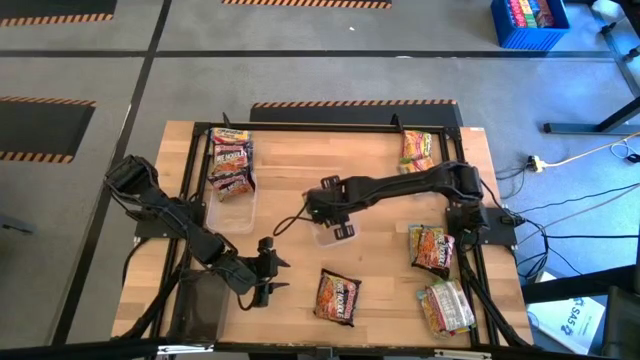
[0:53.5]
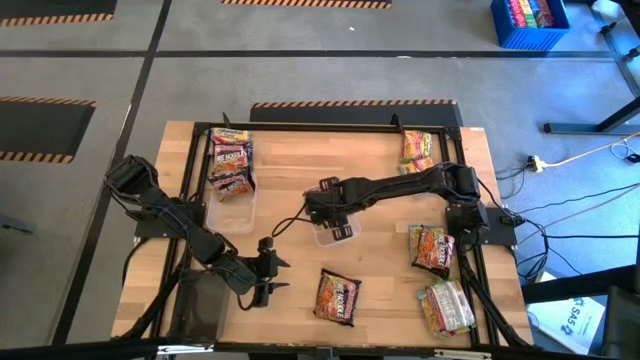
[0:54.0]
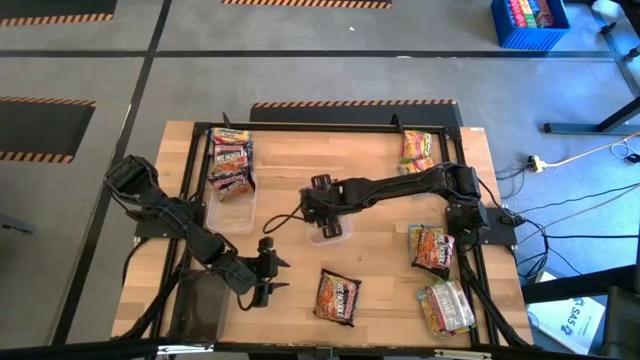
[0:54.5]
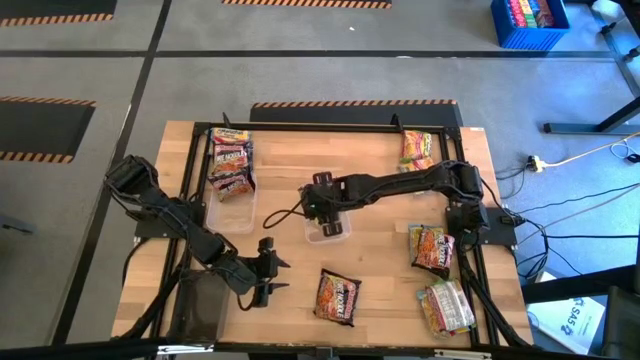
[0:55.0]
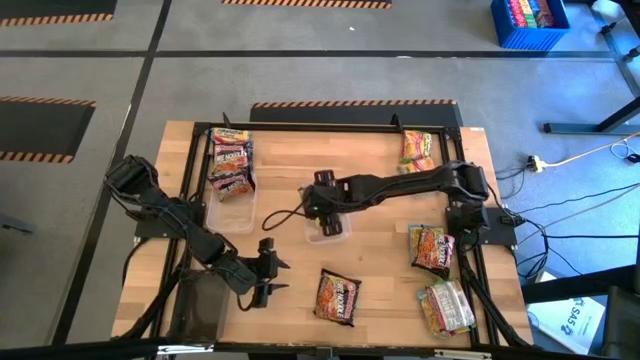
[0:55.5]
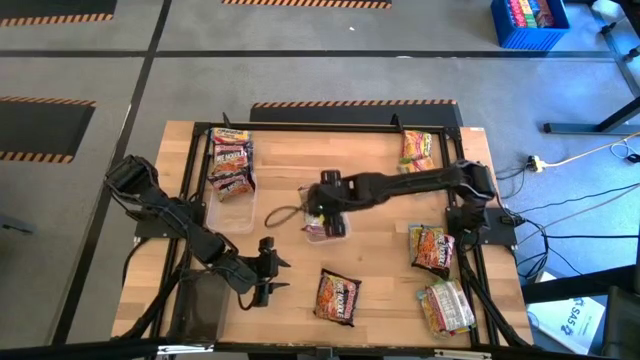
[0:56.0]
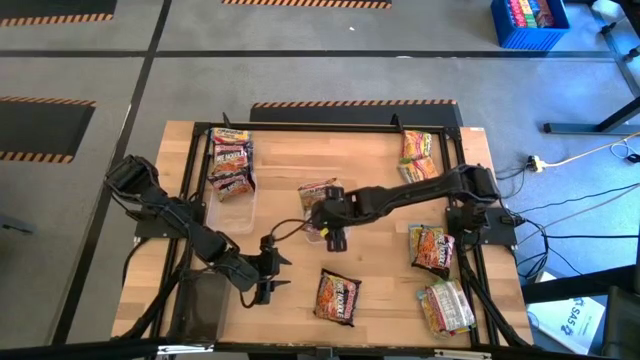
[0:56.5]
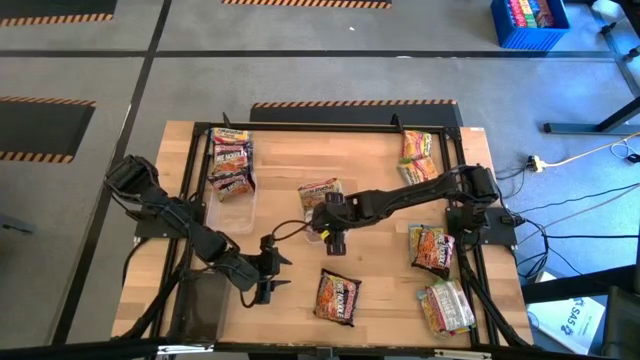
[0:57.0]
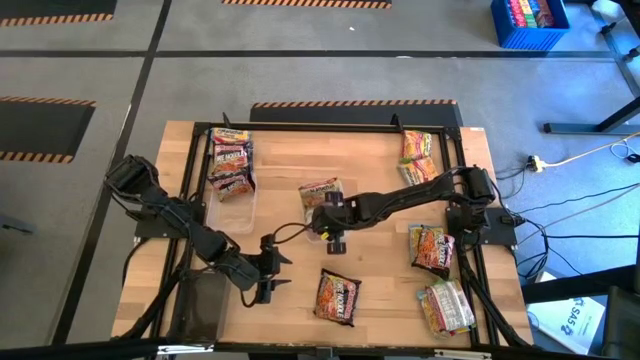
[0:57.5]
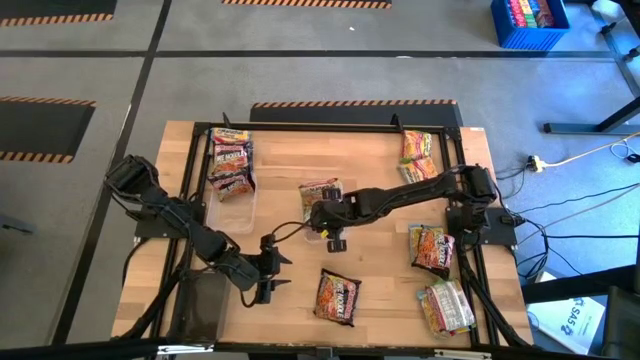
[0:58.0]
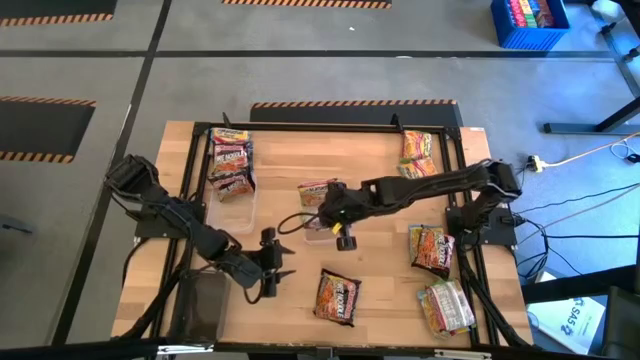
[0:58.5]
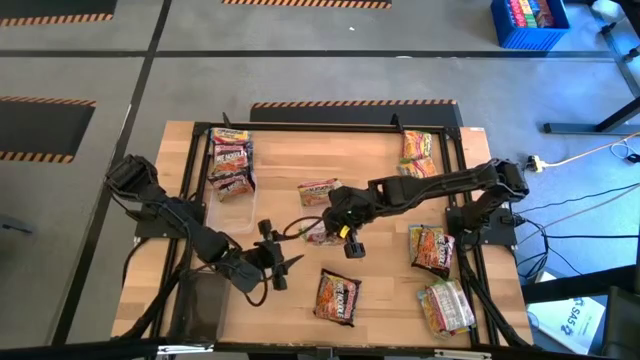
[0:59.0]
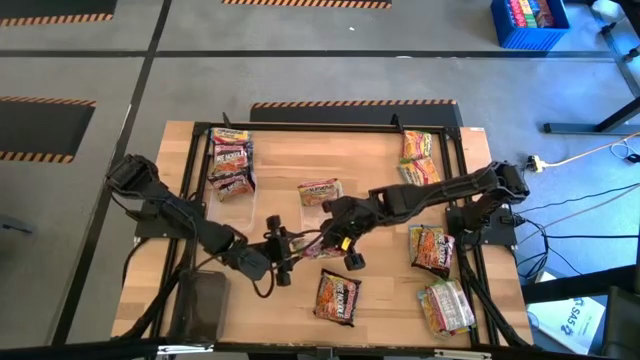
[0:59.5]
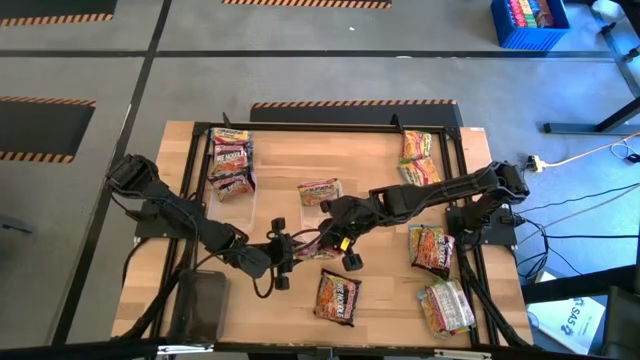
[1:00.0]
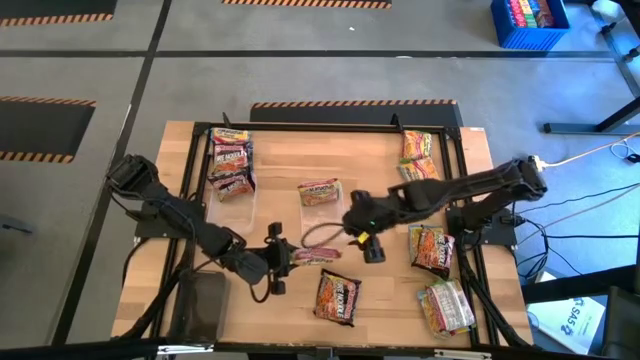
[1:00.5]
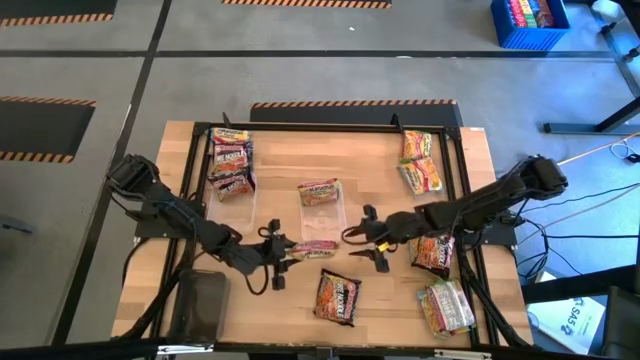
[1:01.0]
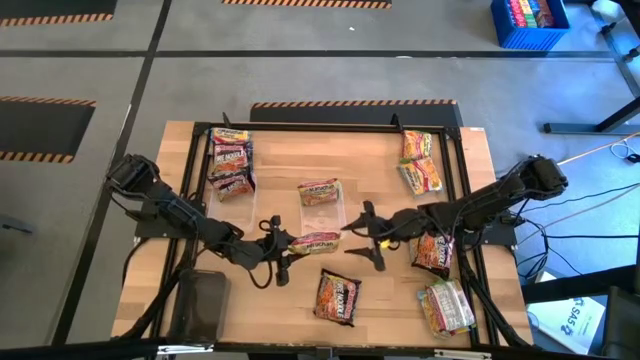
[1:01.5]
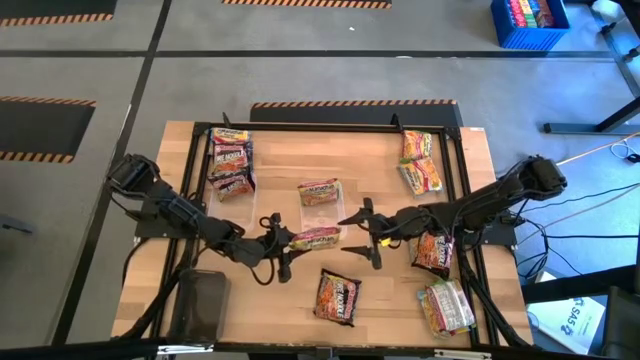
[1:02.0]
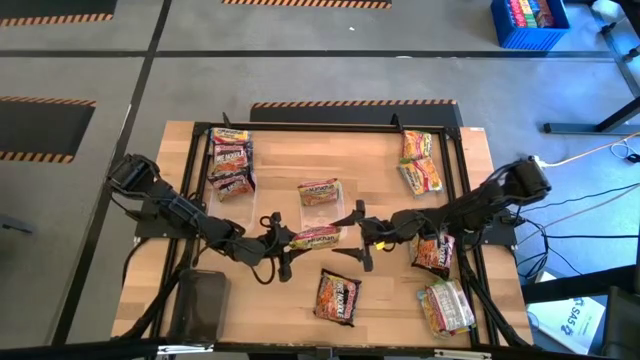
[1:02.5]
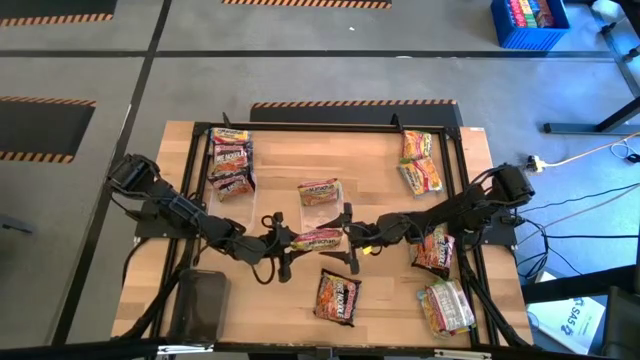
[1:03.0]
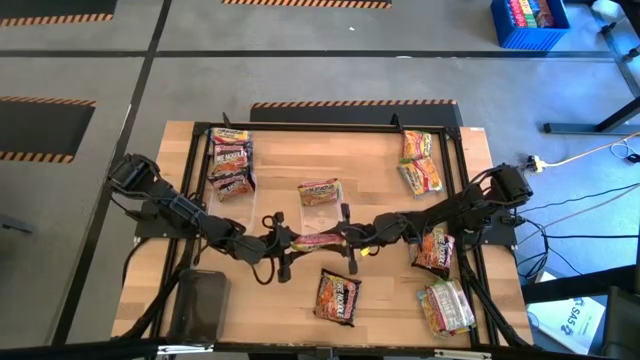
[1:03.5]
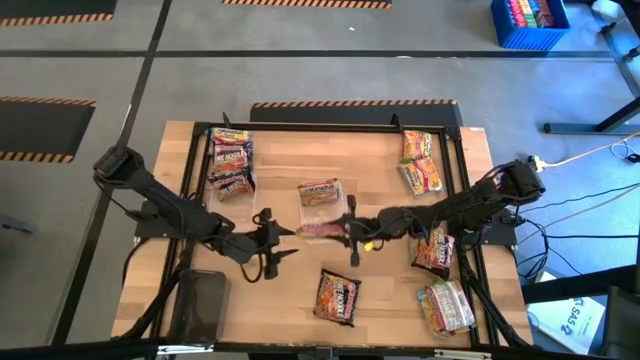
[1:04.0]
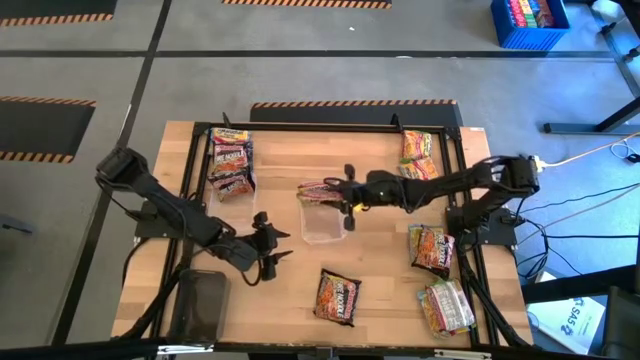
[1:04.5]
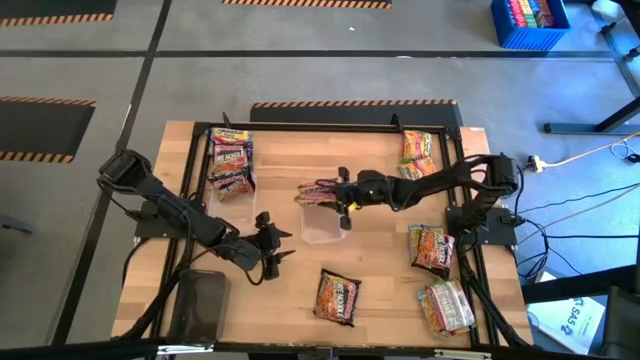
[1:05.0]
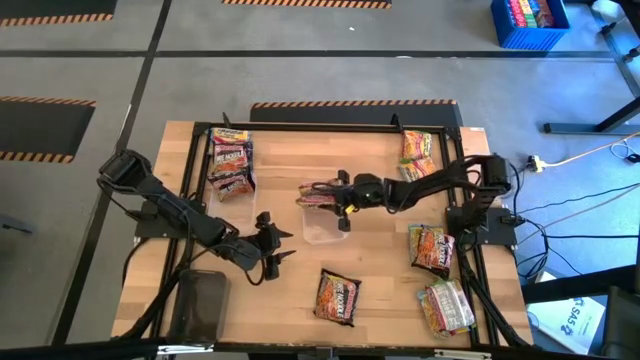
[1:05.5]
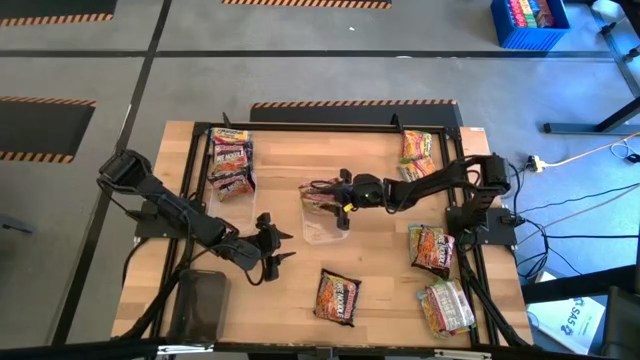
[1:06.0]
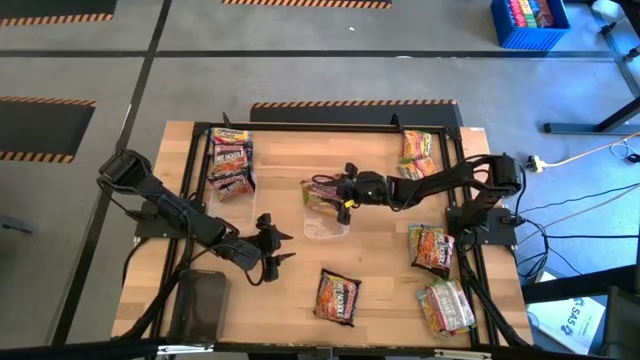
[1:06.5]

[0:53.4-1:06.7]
Task: Sort Maruchan noodles
Put the green noodle pack into the right transparent bin

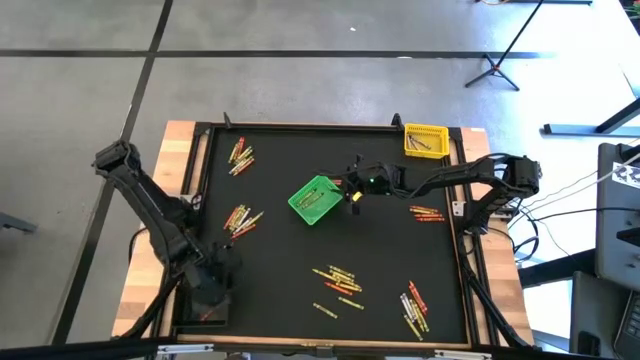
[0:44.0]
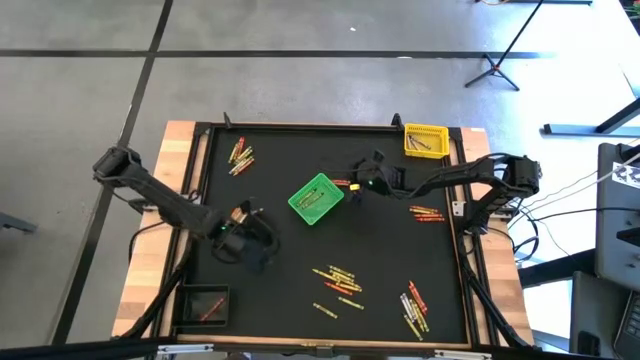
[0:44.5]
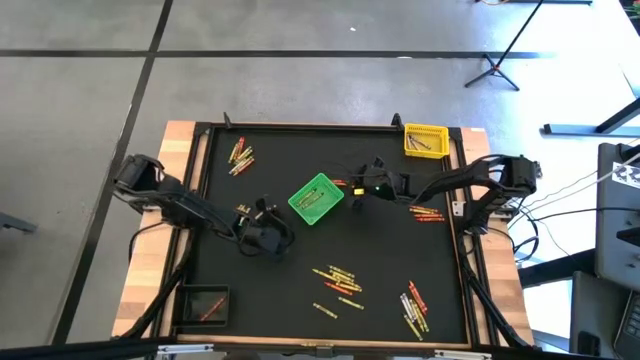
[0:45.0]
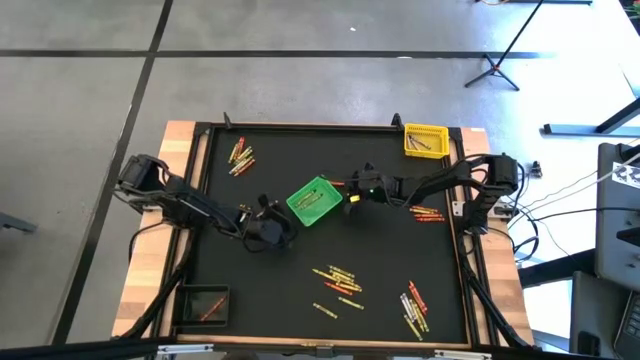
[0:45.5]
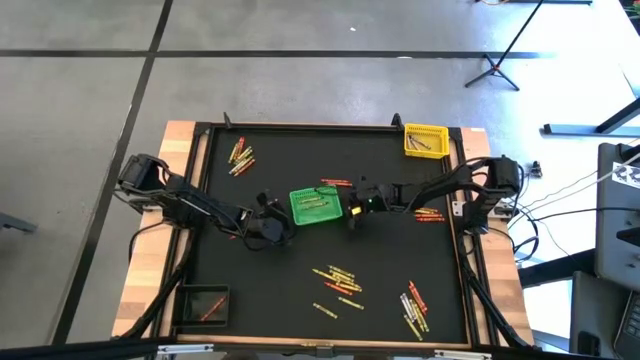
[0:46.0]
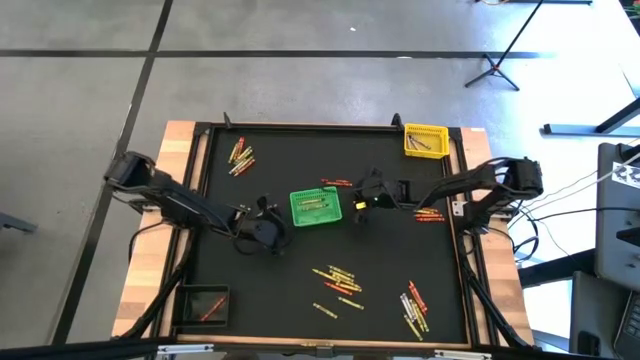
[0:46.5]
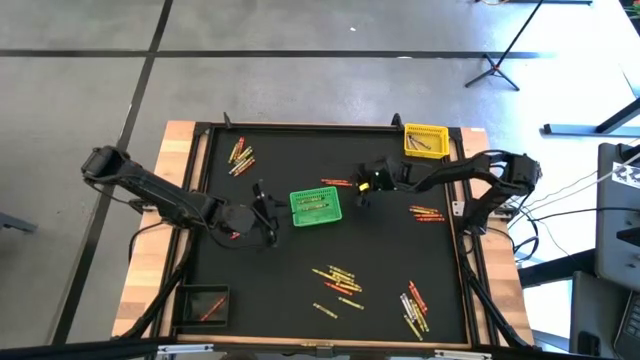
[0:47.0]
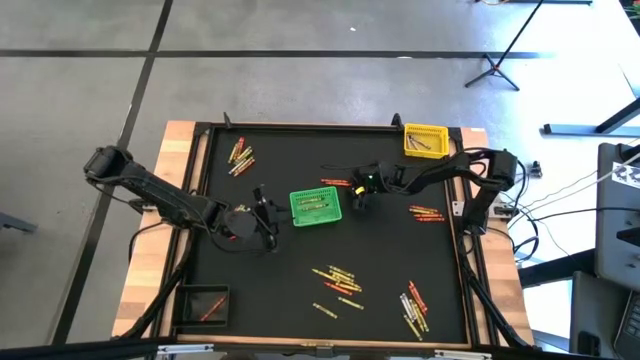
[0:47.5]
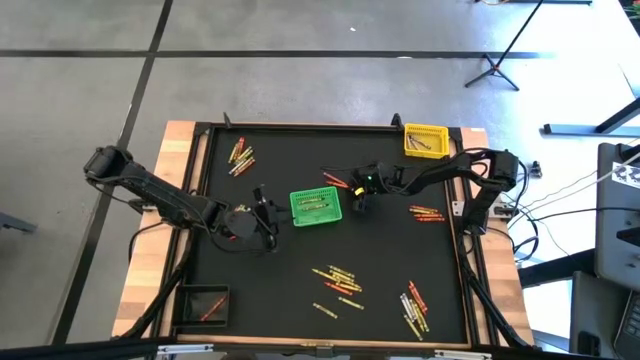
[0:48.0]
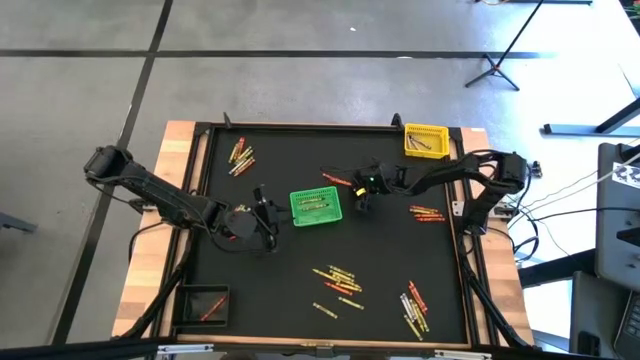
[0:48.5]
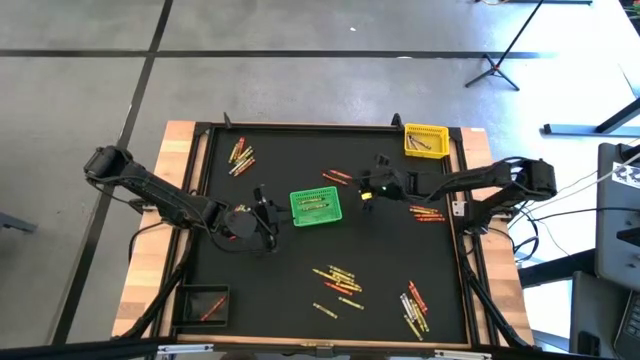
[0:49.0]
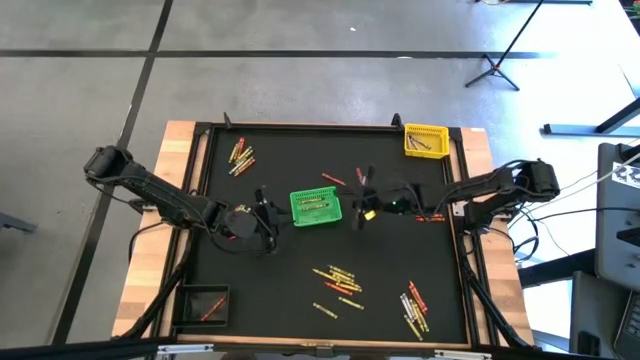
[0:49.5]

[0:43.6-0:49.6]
Task: Sort crayons
Put the orange crayon into the black bin
